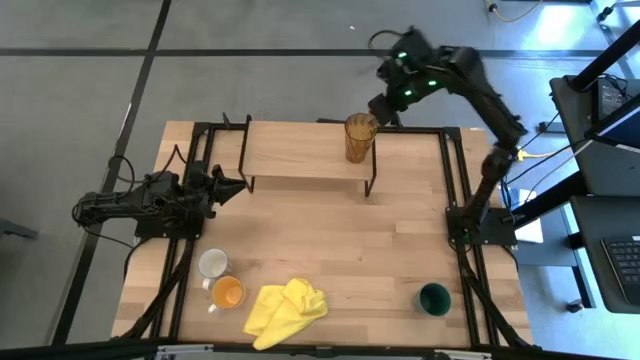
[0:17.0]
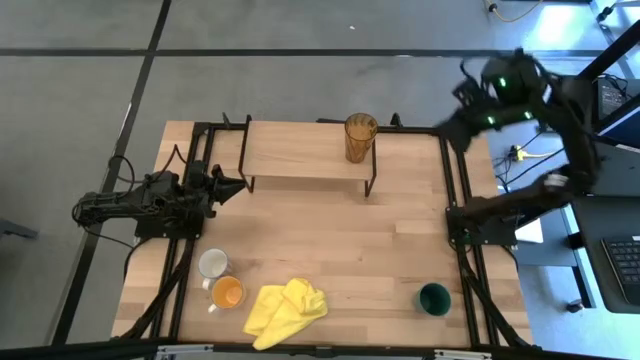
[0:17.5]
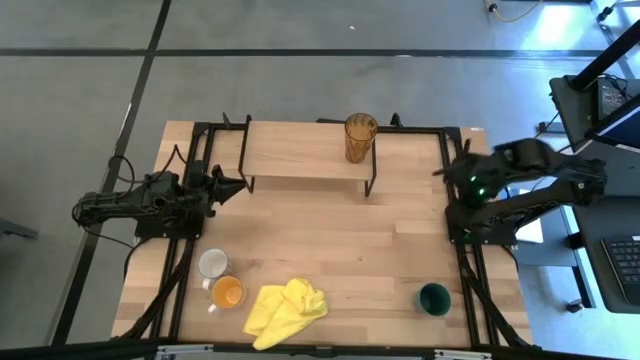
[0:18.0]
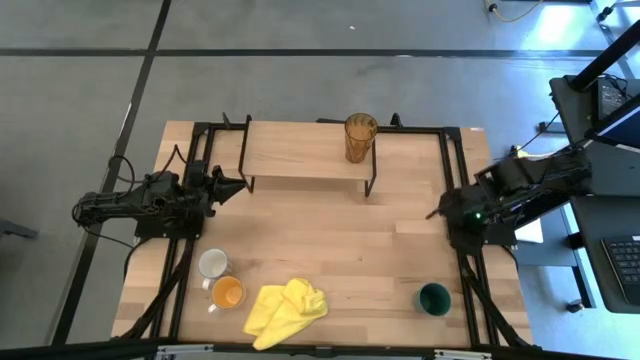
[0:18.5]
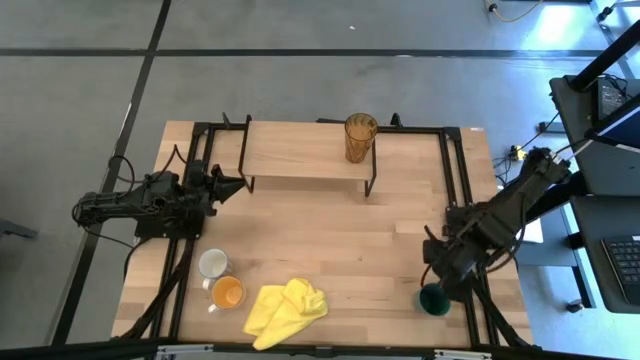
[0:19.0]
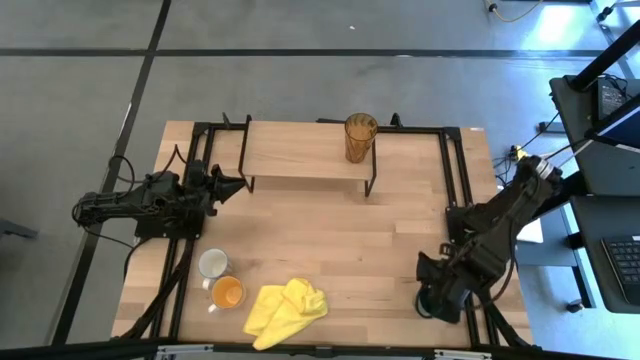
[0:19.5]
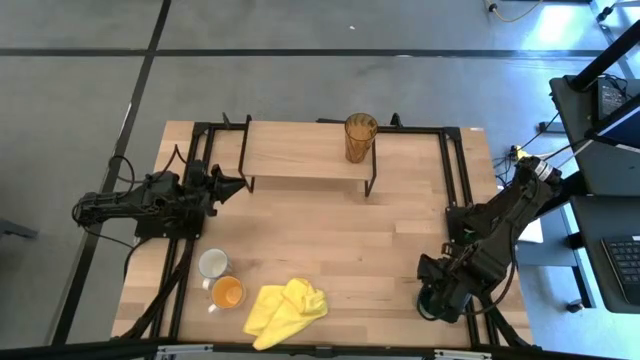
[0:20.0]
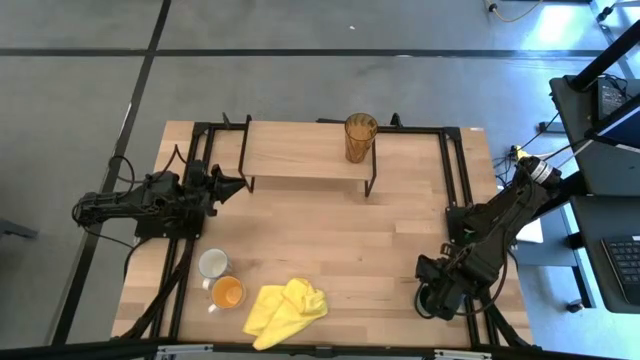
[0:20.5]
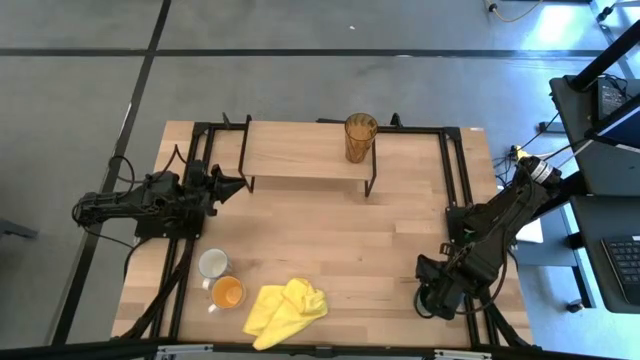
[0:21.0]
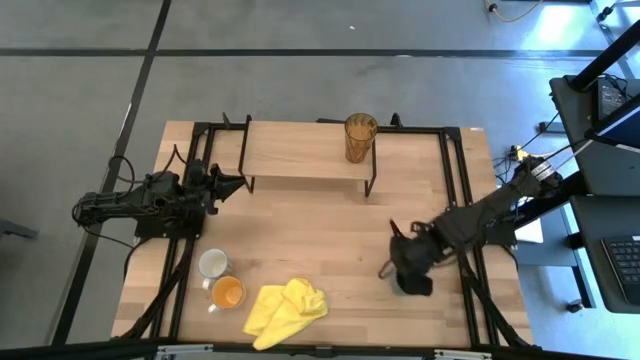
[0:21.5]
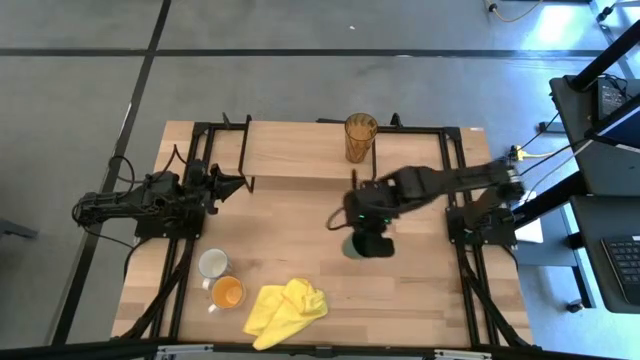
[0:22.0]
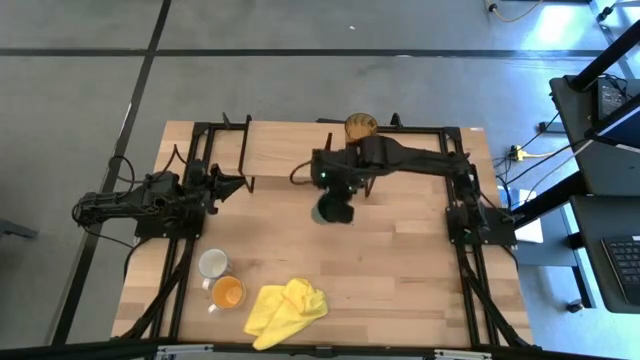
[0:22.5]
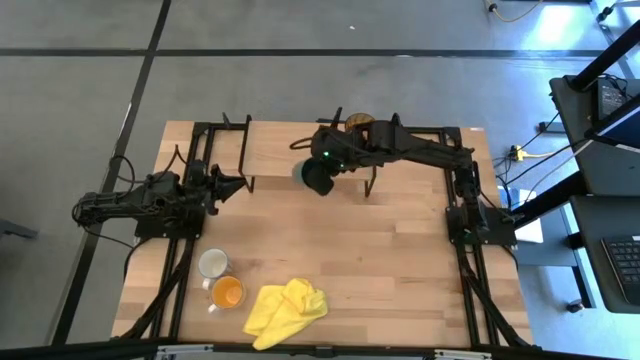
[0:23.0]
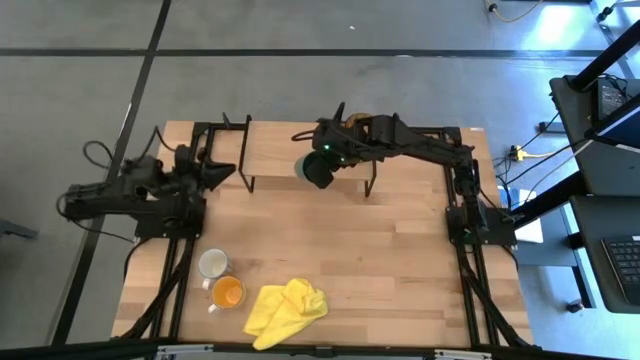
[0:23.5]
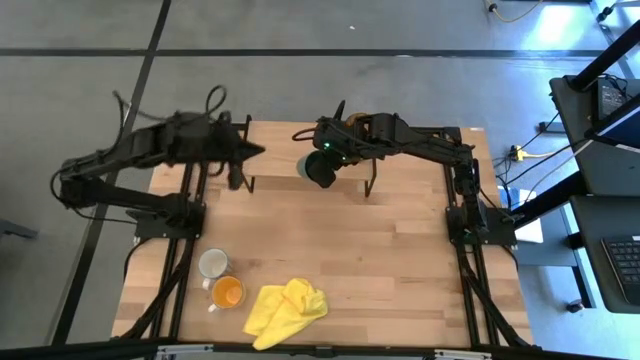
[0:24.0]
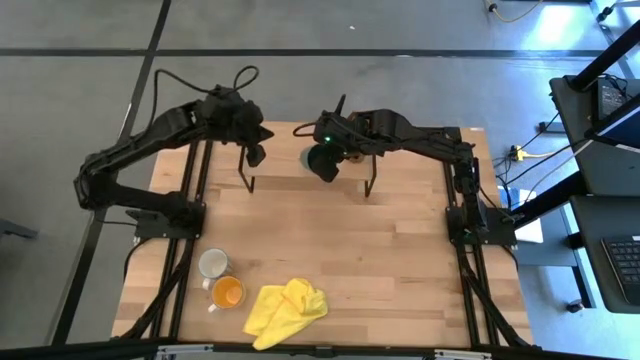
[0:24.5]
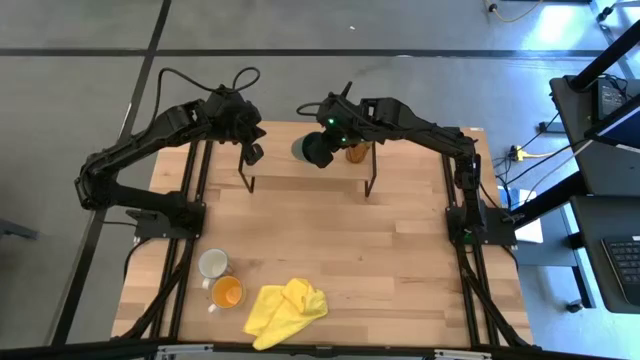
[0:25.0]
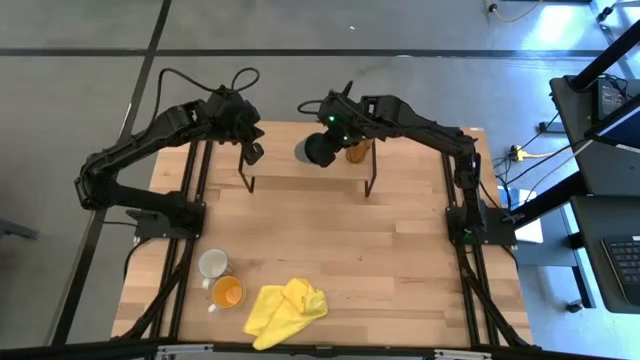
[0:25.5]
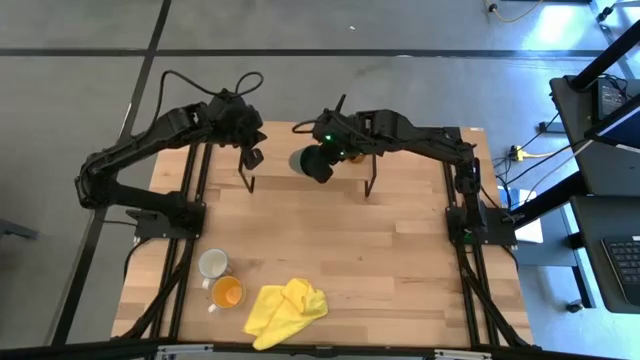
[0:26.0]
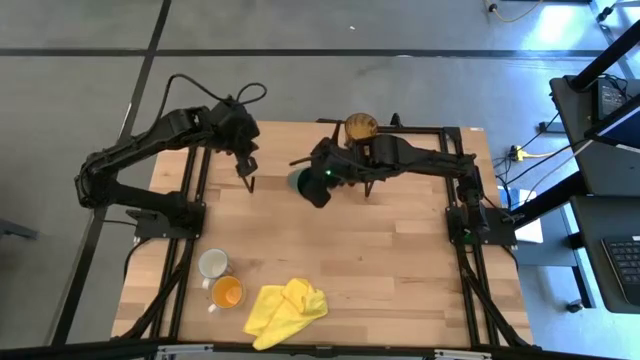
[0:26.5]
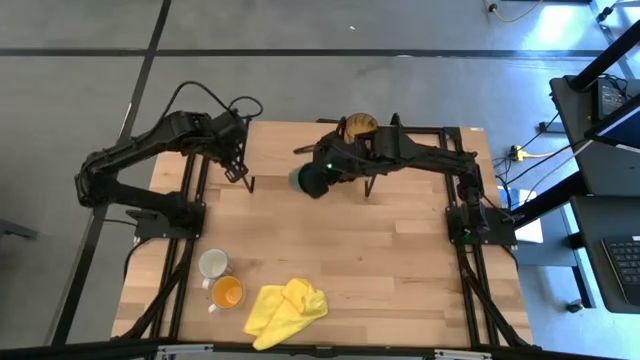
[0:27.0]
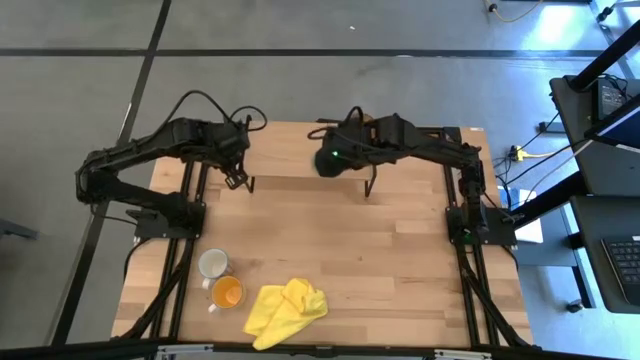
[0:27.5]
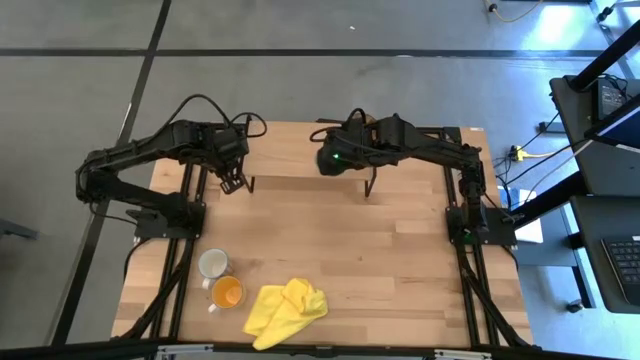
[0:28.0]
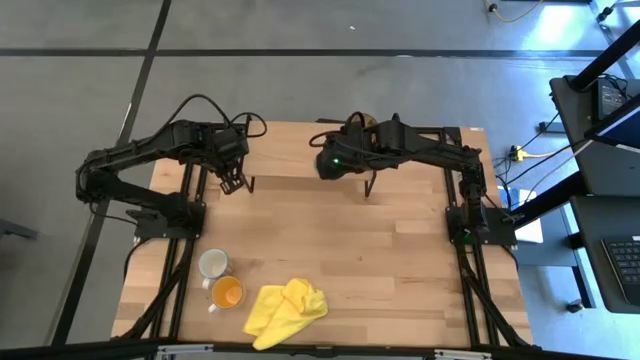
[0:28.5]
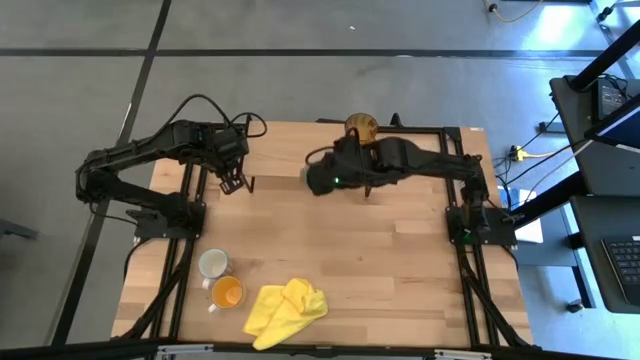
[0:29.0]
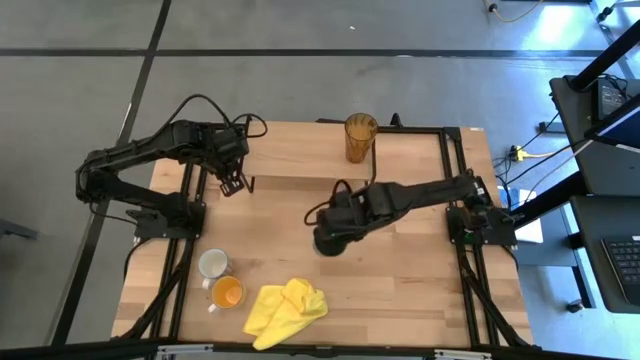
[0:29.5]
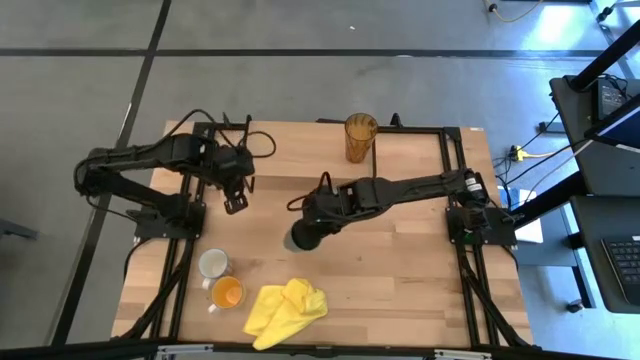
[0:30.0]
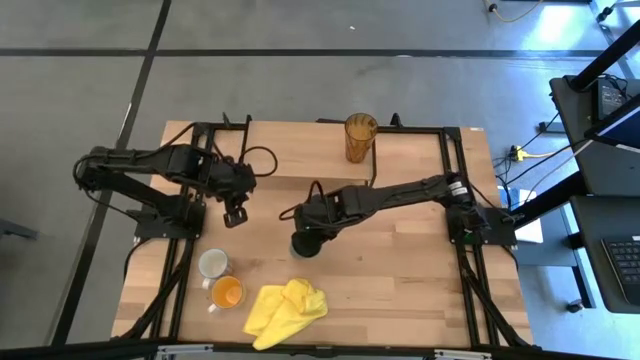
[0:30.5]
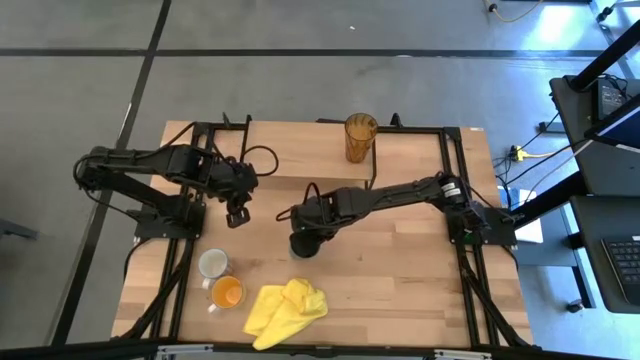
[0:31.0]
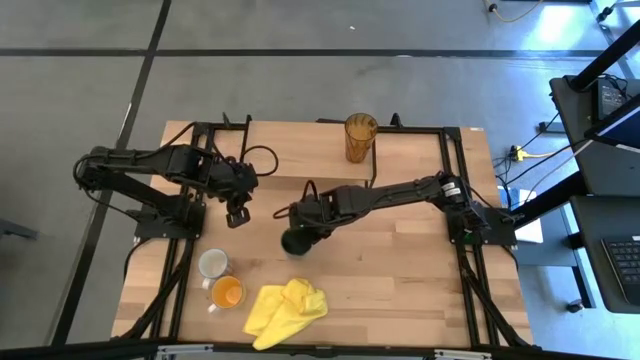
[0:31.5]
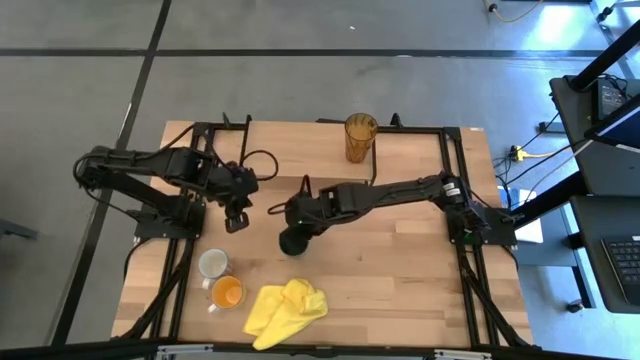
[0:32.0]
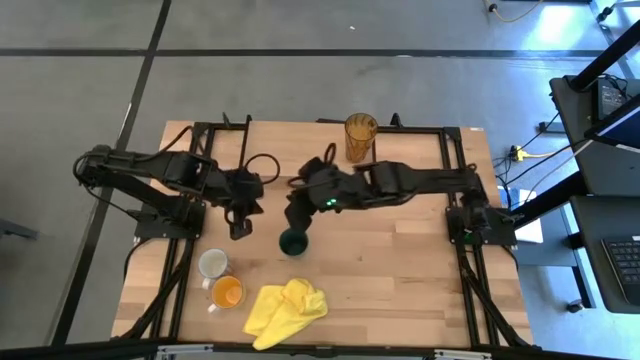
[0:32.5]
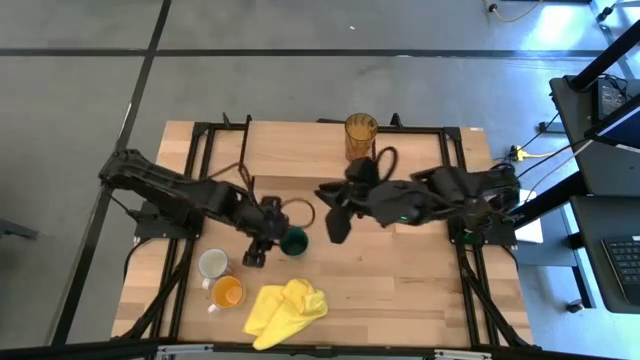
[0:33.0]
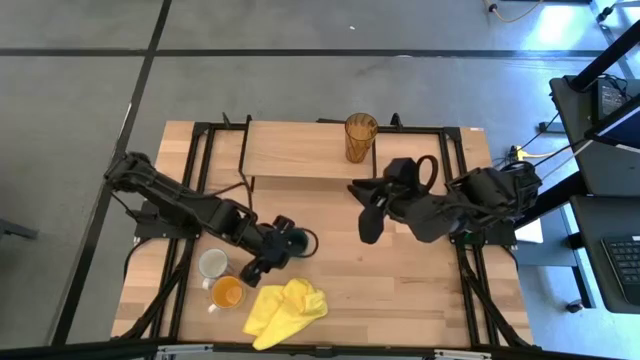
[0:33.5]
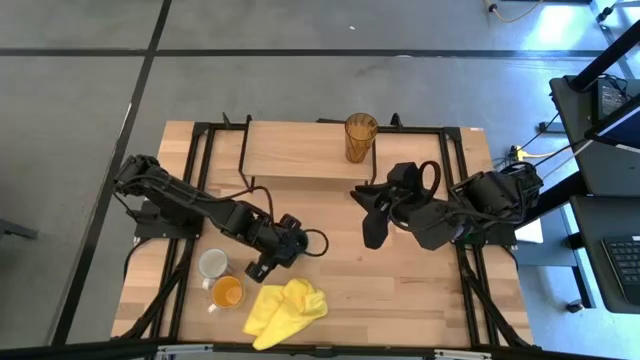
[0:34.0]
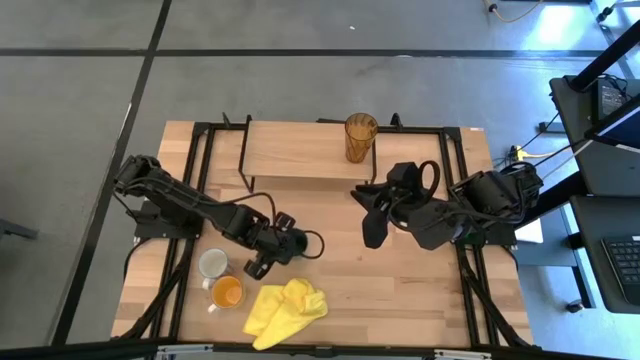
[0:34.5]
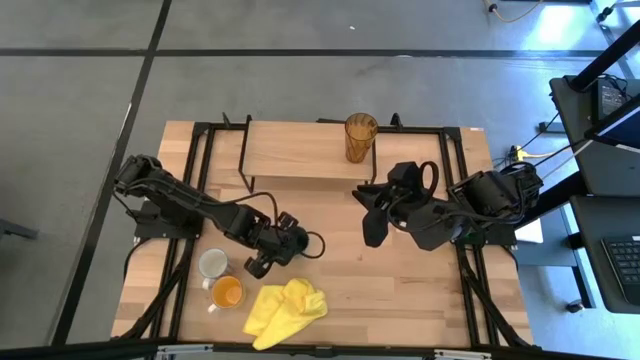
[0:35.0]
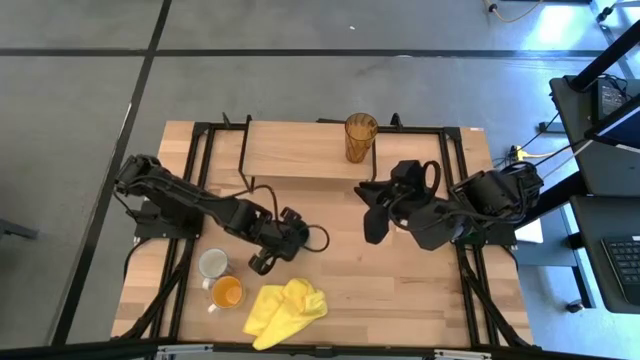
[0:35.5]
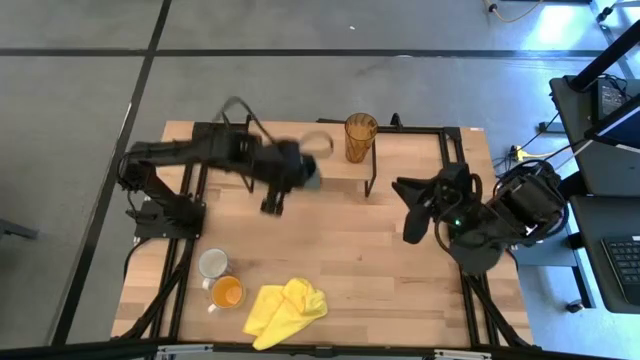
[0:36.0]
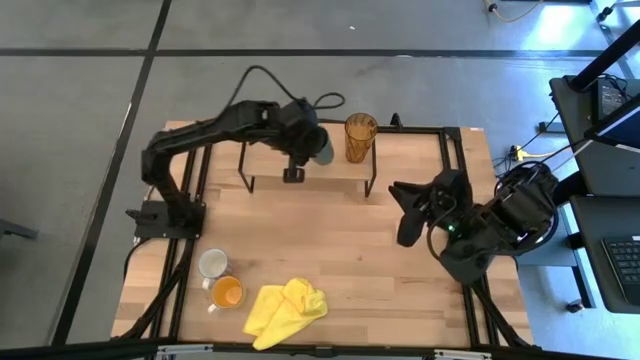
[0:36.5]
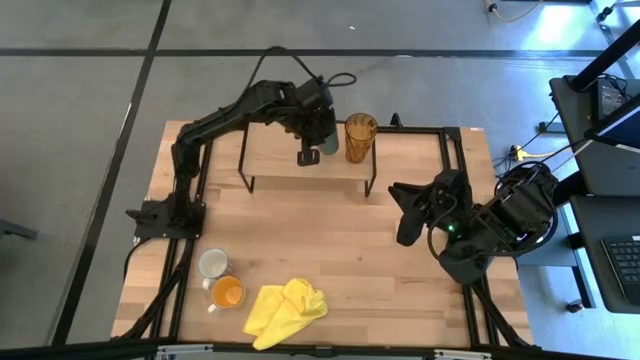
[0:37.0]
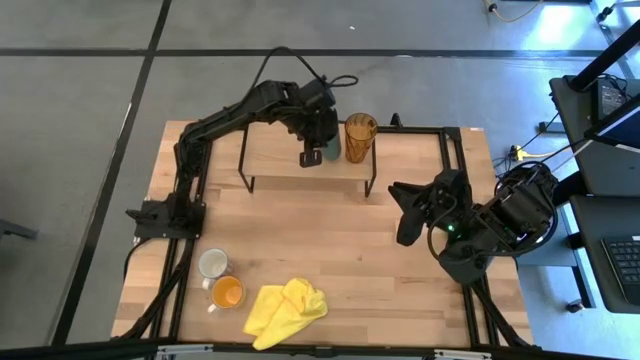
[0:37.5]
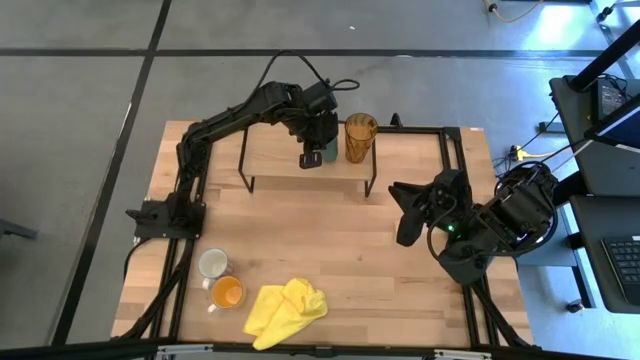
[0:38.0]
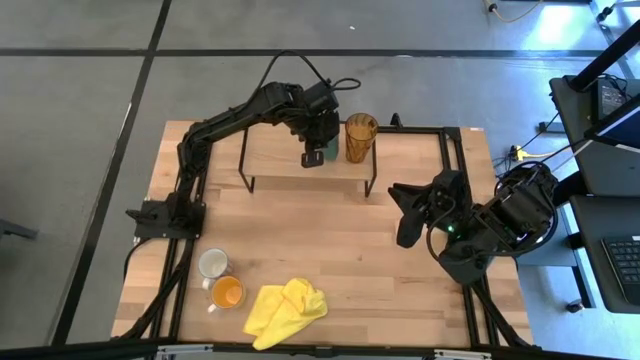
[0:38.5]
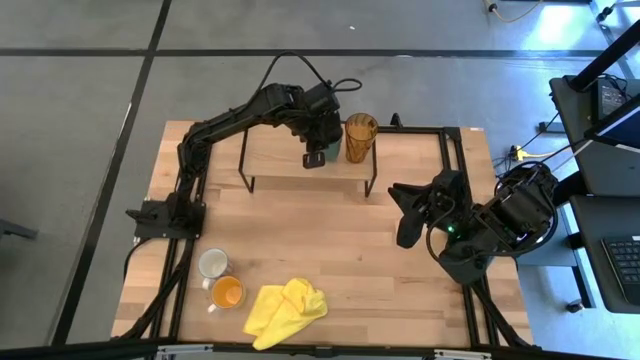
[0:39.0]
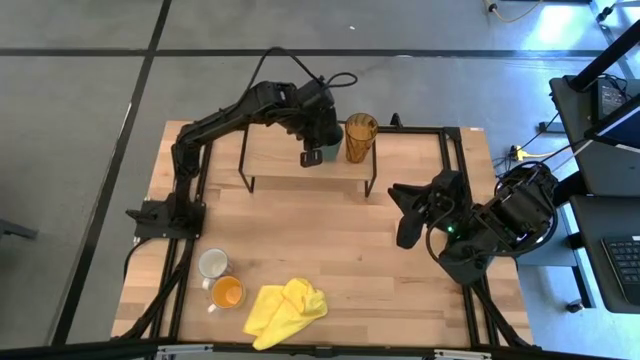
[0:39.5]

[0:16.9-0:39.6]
Task: Stack small to large cups/mugs on shelf
Put the green cup on the shelf
